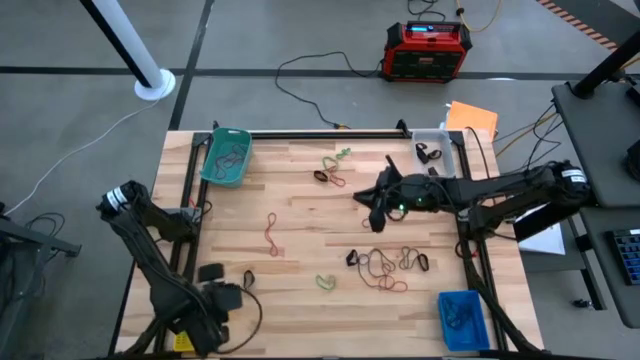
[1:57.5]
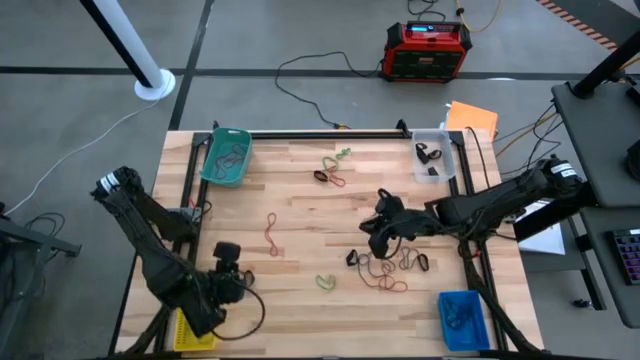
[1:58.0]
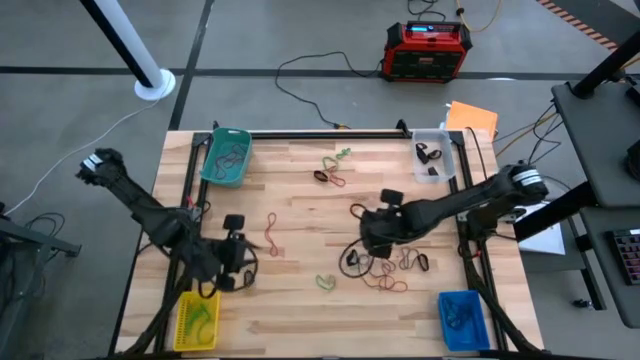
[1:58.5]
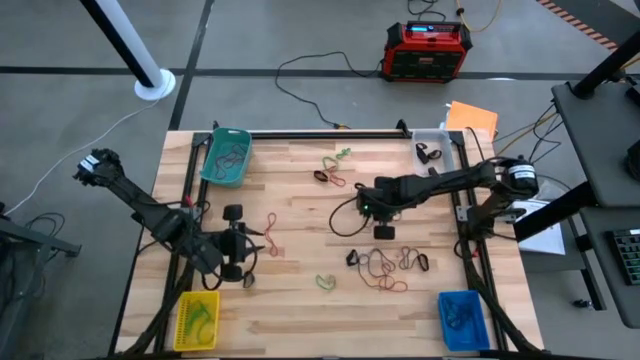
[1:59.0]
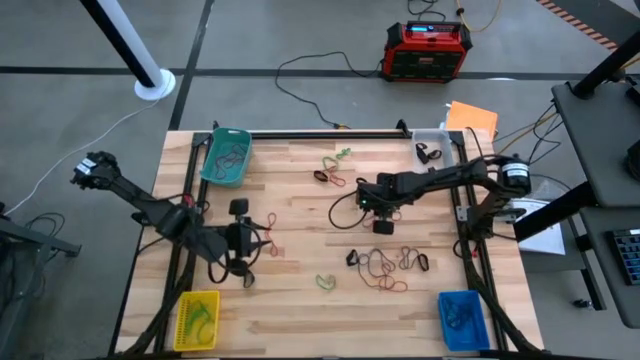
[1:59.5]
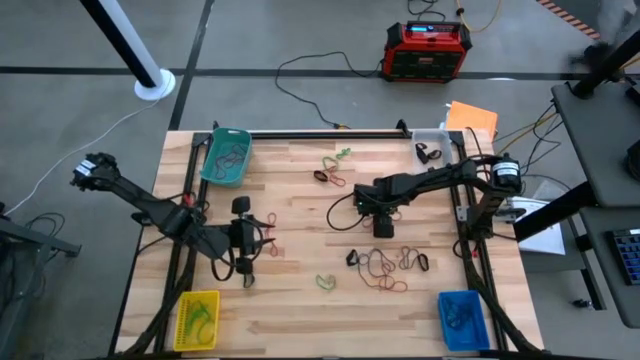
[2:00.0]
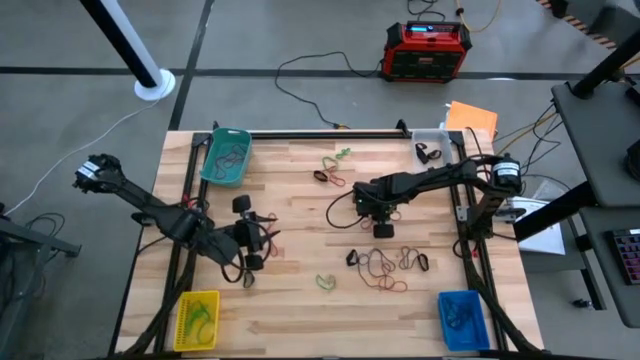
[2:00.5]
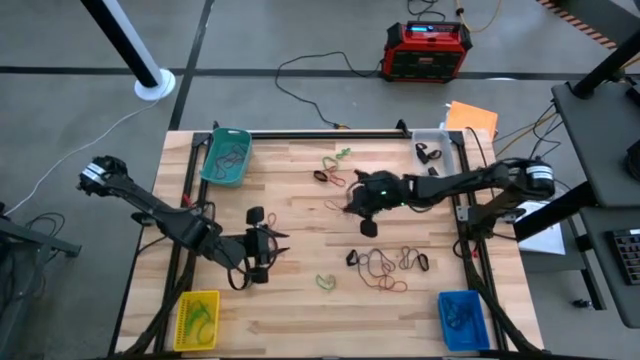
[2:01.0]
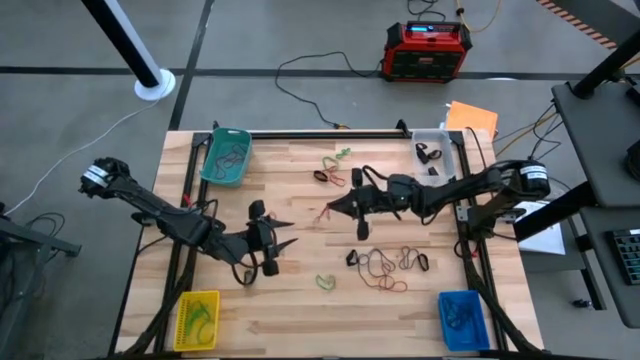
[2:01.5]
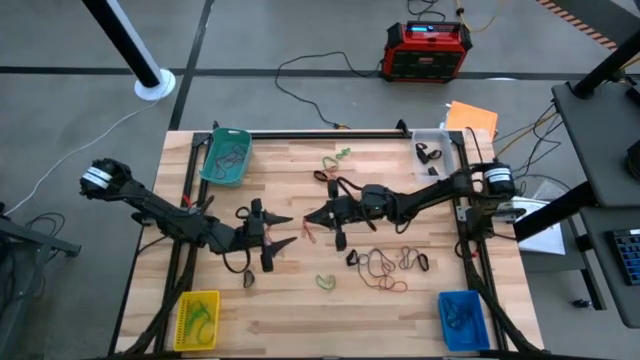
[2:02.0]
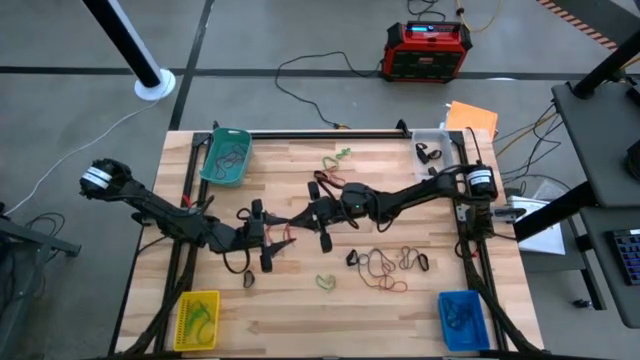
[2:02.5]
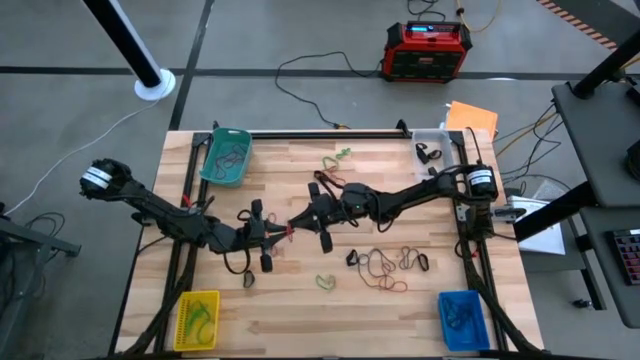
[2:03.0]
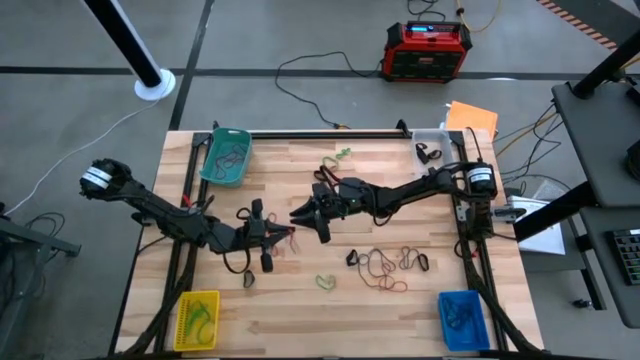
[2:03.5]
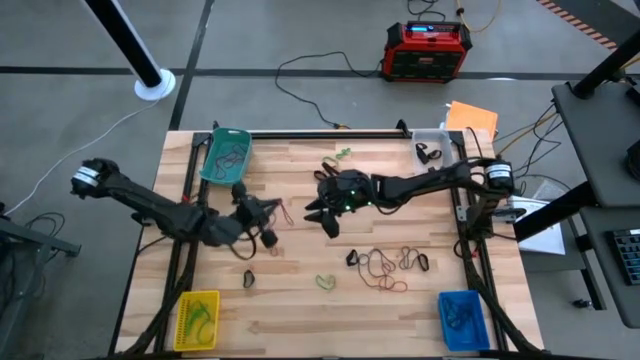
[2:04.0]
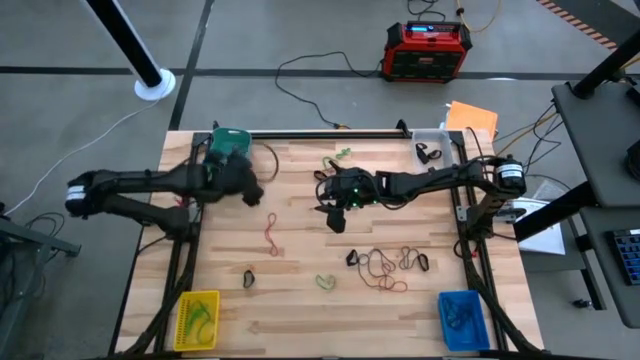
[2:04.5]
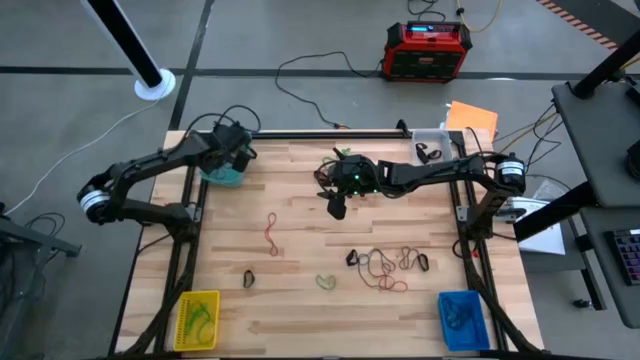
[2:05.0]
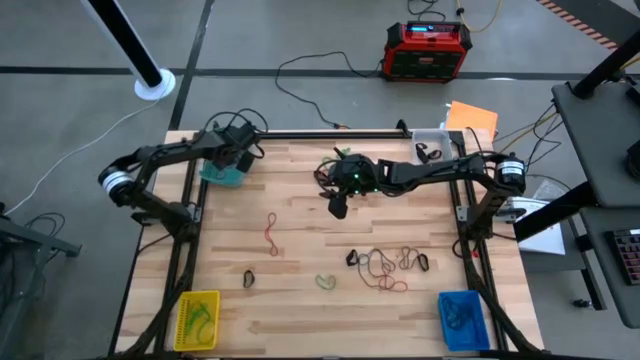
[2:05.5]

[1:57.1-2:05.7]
Task: Sort rubber bands into baskets
Put the red rubber band into the green bin

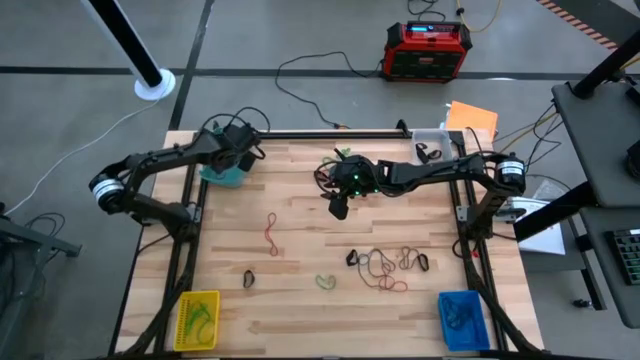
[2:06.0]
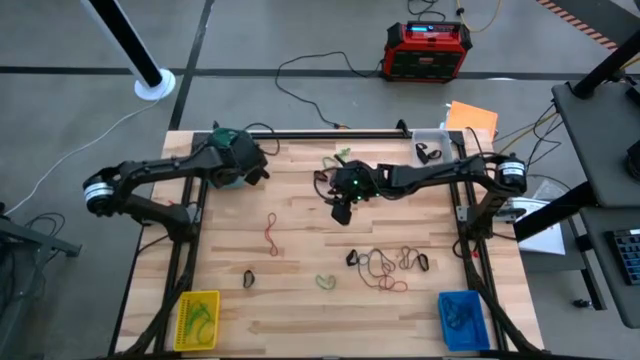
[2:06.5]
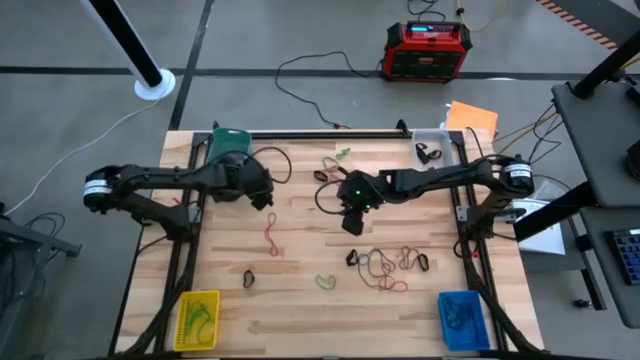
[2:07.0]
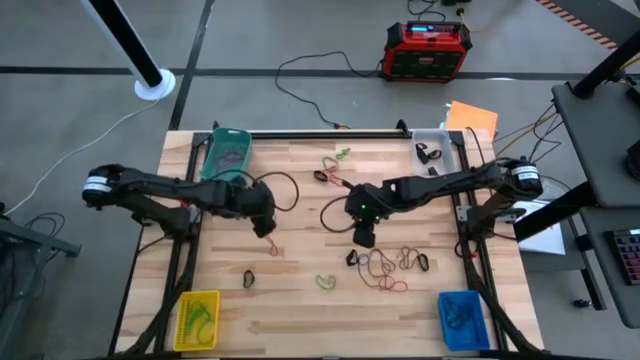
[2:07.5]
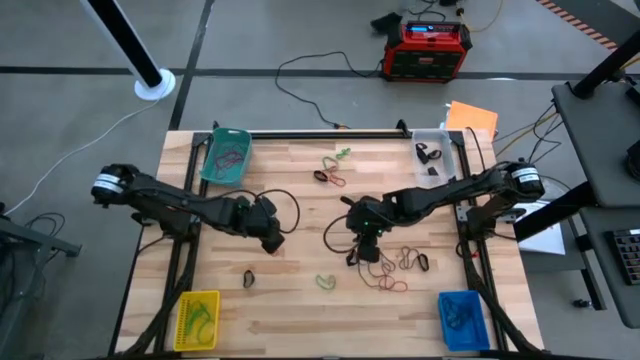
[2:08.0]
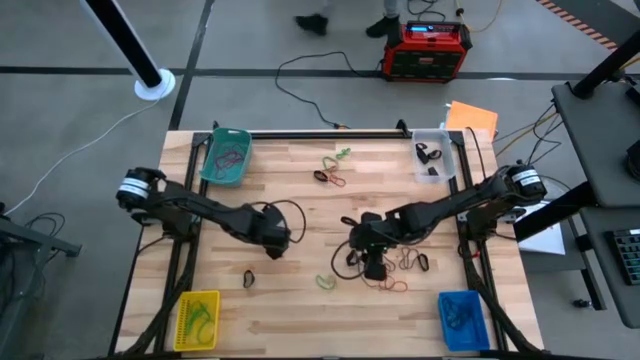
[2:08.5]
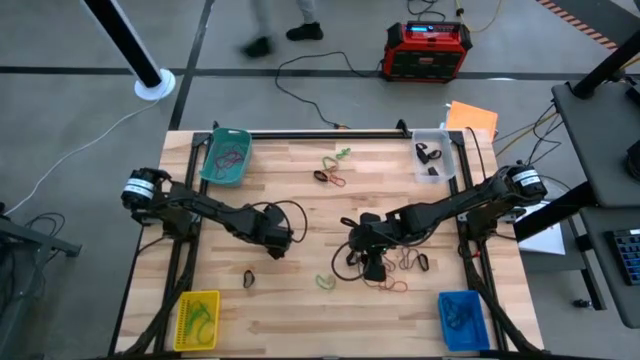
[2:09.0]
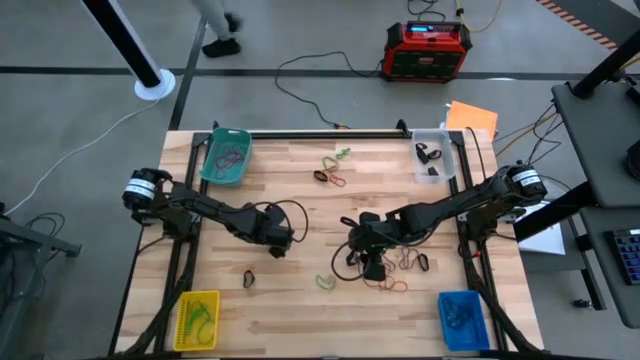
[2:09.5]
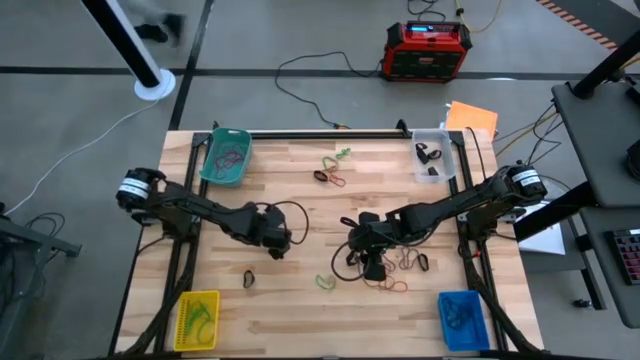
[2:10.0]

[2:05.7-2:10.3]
Put the red rubber band into the green bin

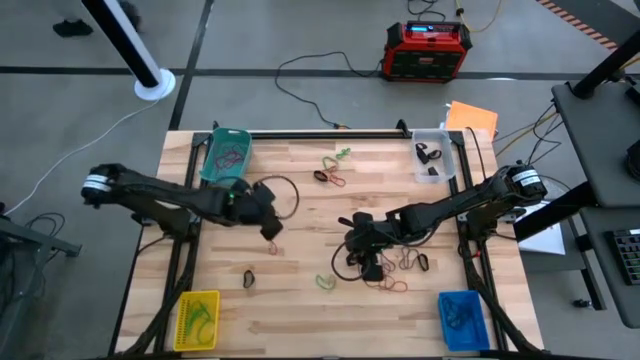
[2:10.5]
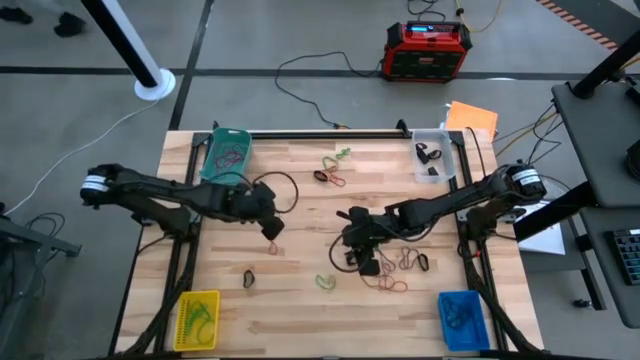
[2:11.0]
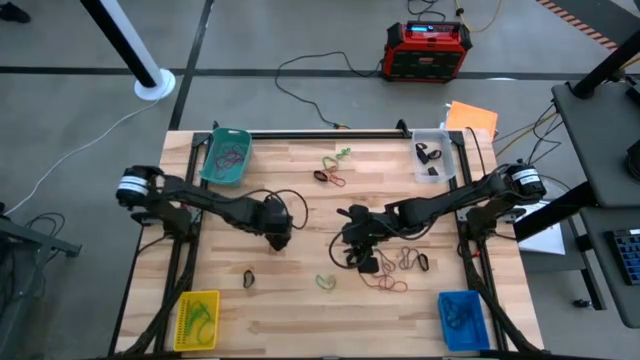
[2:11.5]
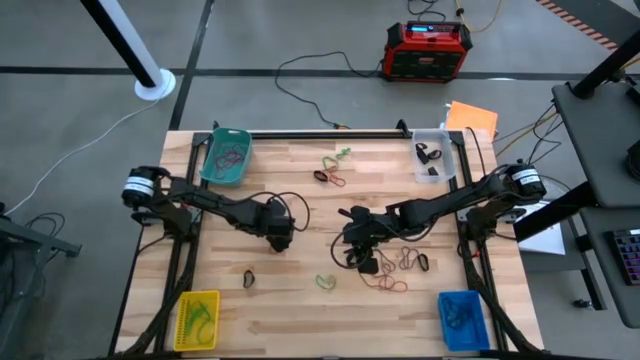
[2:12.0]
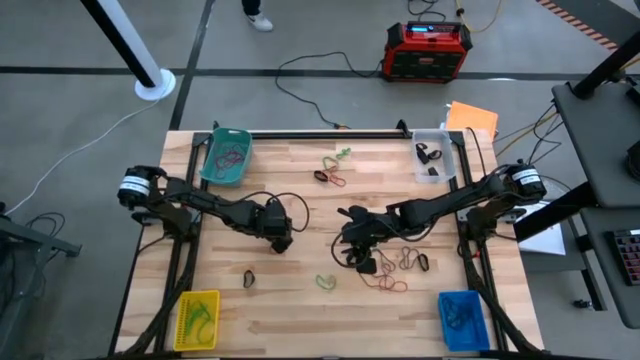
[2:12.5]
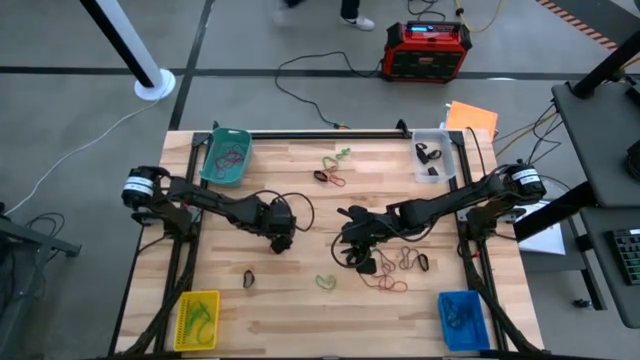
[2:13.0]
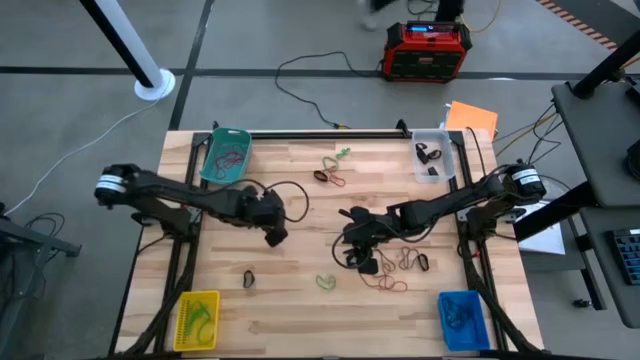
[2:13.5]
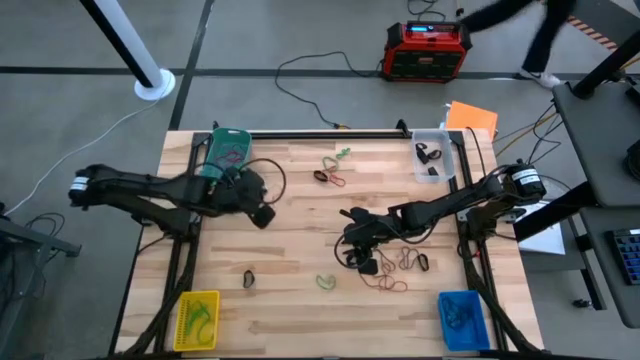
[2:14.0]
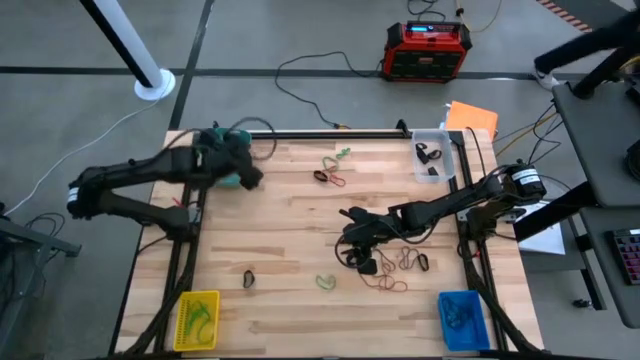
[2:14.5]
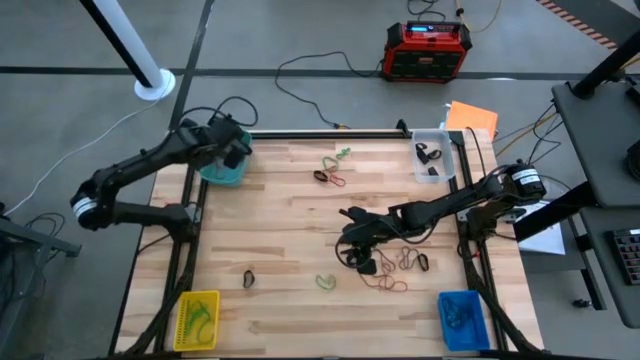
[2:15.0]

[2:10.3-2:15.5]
Put the red rubber band into the green bin

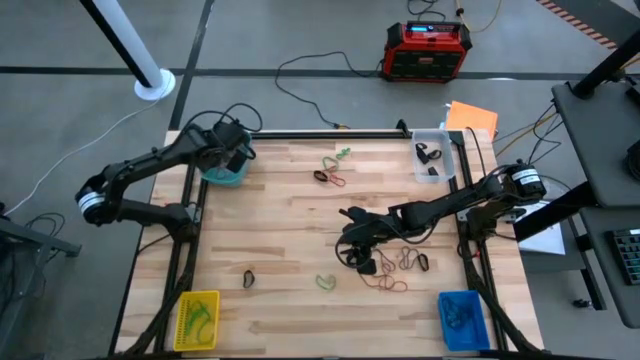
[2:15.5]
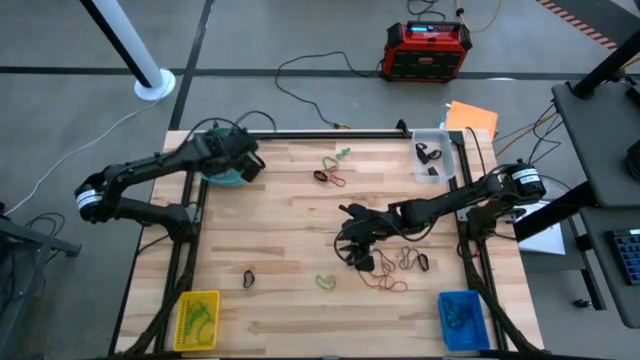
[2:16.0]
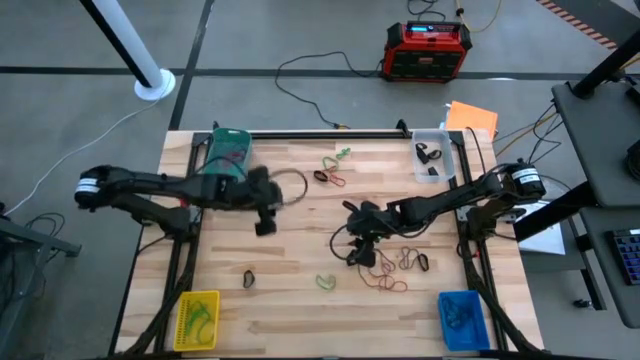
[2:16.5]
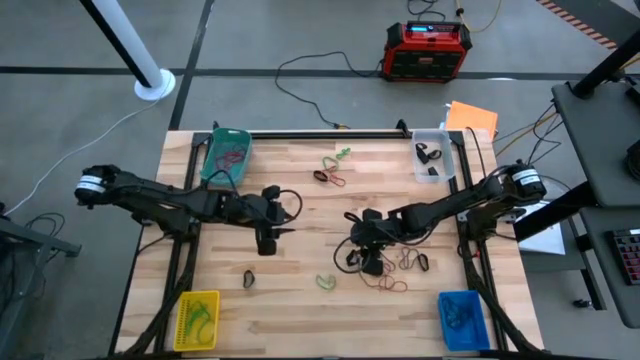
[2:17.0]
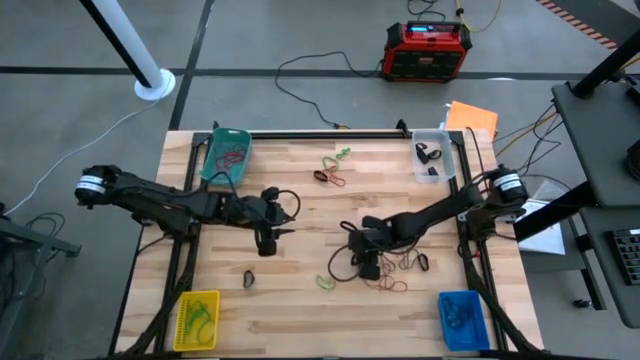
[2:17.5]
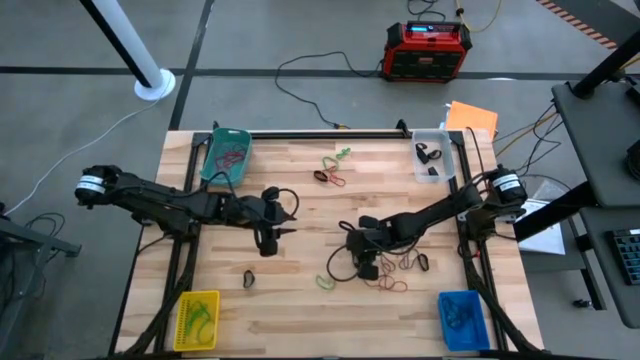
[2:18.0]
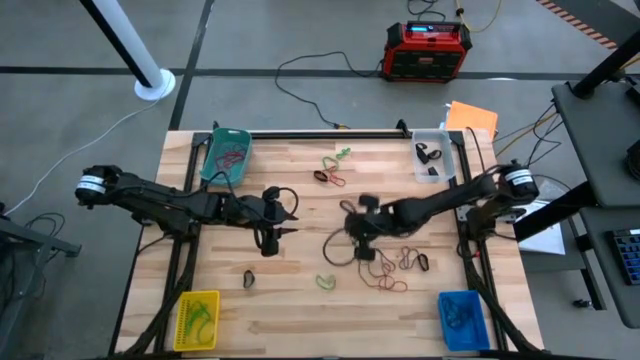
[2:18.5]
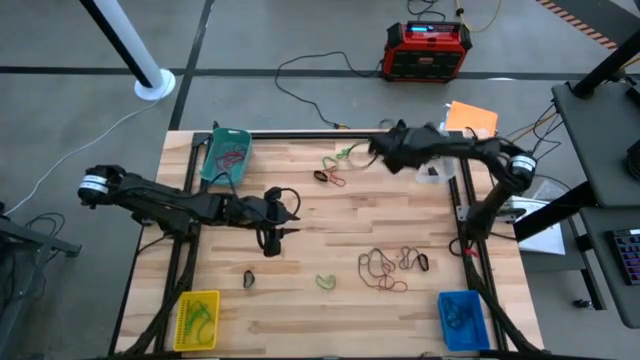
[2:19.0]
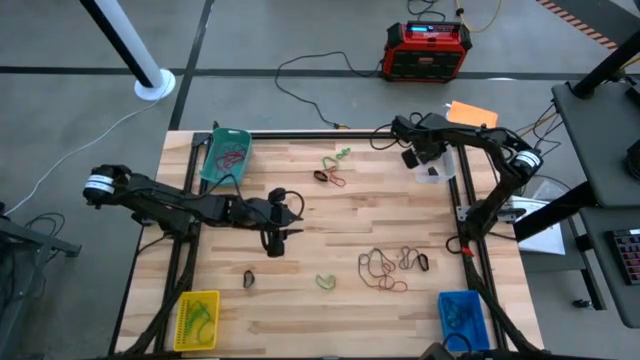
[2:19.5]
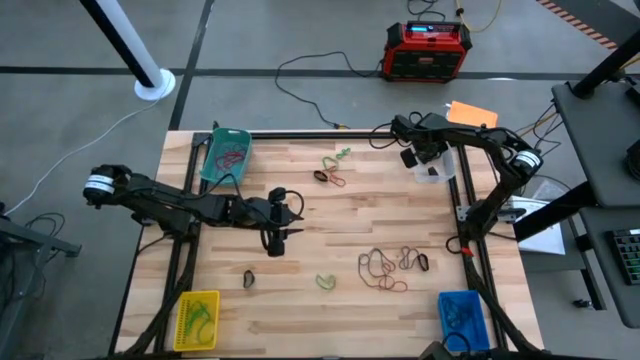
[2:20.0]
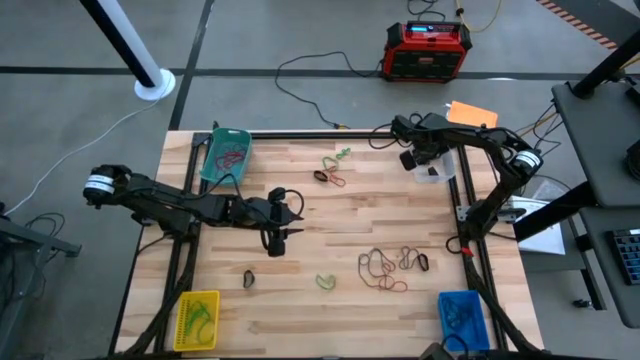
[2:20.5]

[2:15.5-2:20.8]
Put the black rubber band into the transparent bin
